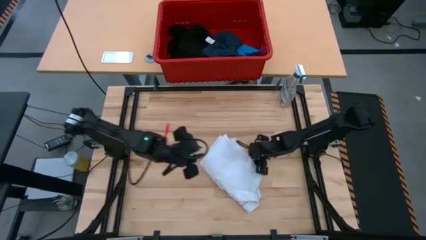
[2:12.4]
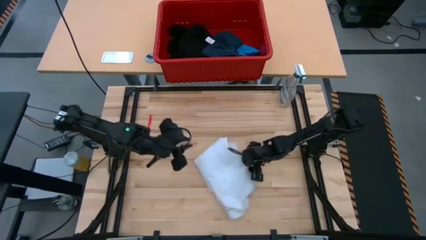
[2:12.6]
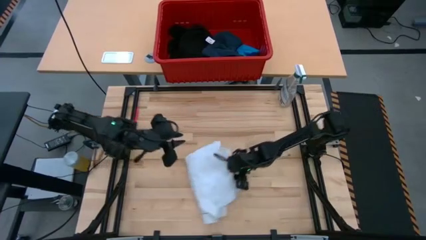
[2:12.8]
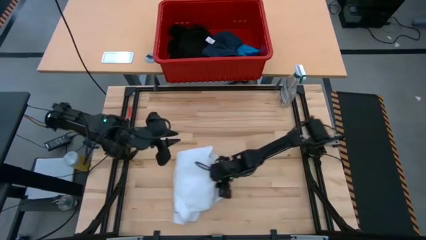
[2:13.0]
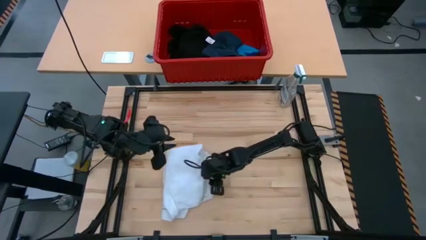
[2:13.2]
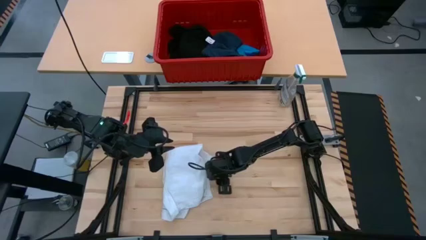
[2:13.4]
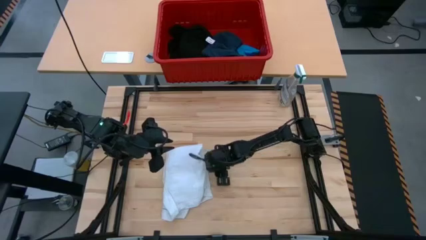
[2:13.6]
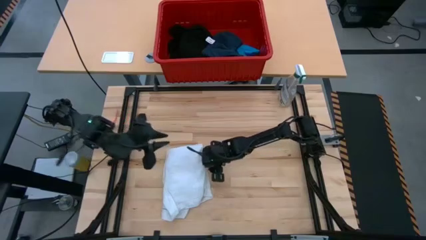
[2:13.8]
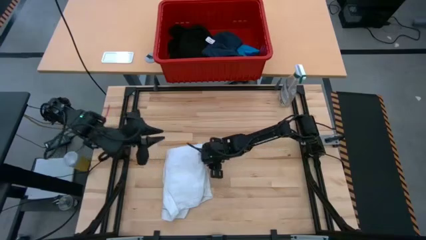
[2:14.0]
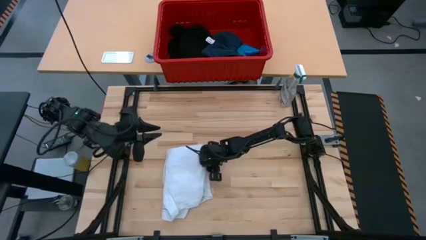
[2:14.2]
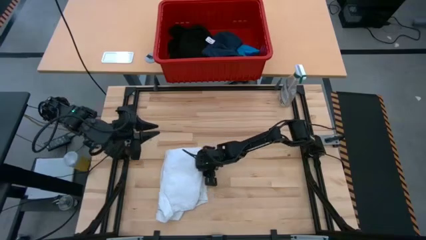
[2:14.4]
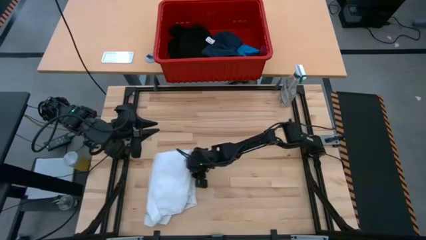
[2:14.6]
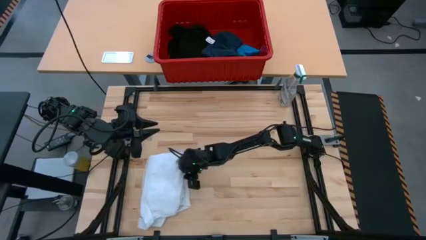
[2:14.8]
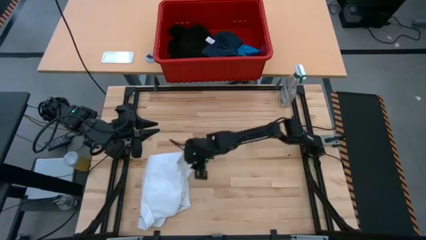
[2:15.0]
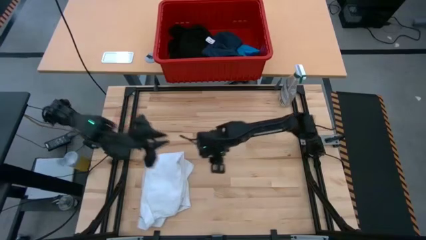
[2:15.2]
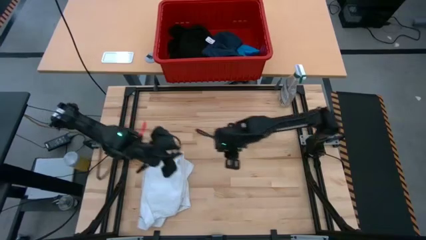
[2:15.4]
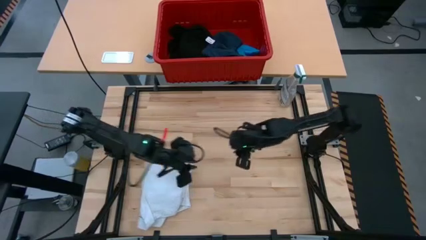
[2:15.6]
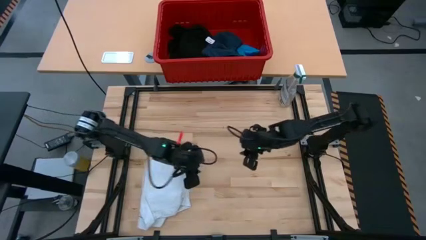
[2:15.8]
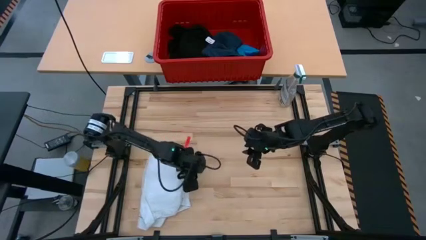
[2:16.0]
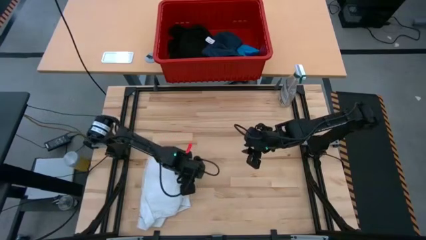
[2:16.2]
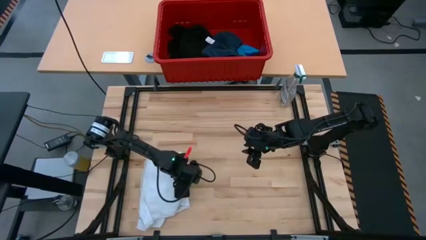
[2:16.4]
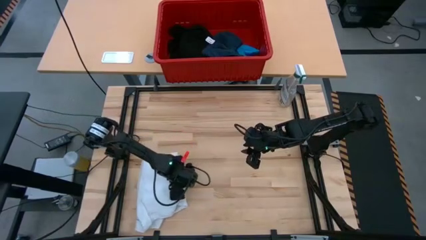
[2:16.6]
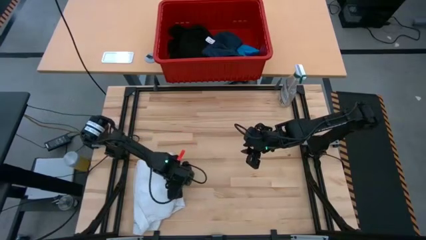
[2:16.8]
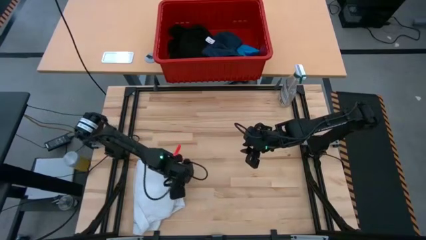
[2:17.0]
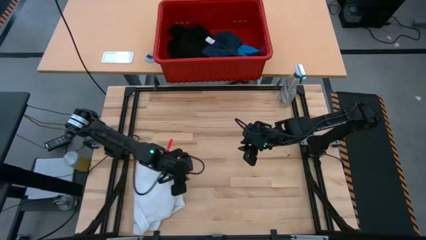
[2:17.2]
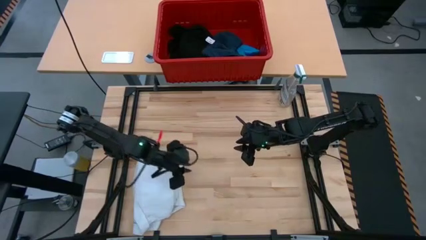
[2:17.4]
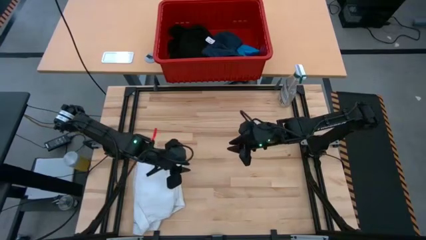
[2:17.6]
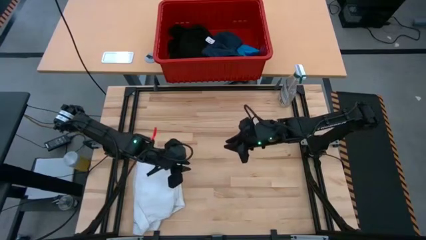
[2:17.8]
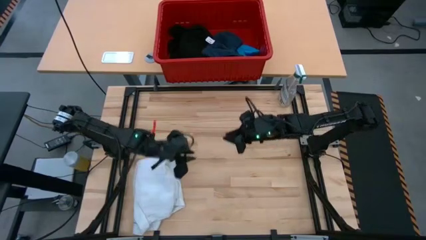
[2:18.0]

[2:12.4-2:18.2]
Task: Fold Laundry from Bin
Adjust the white polo shirt to the bottom left of the table

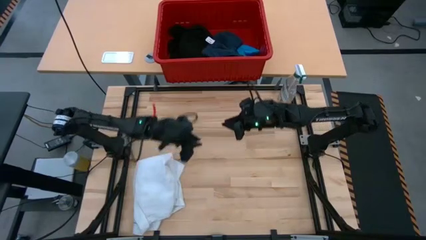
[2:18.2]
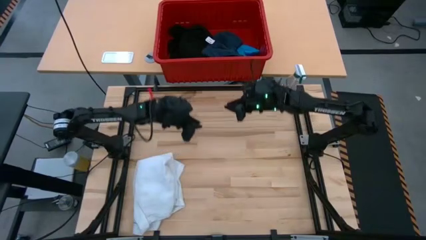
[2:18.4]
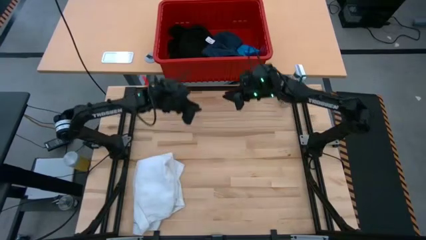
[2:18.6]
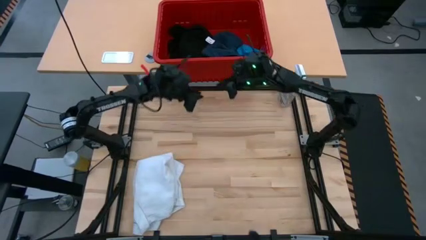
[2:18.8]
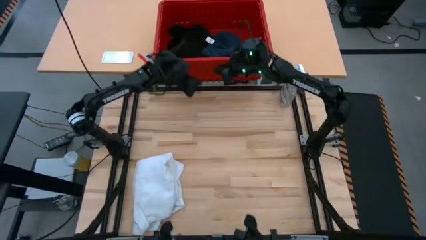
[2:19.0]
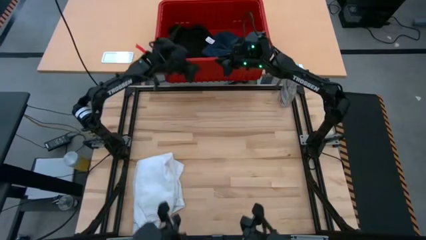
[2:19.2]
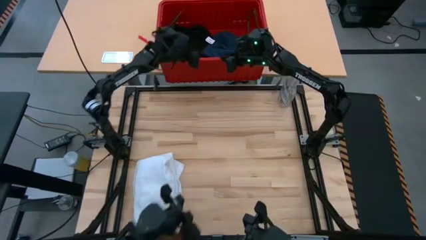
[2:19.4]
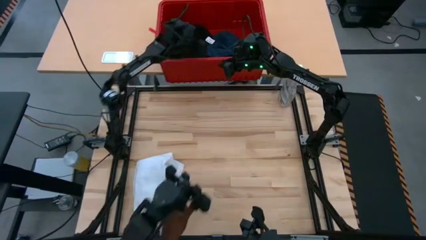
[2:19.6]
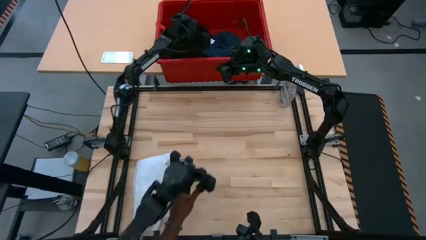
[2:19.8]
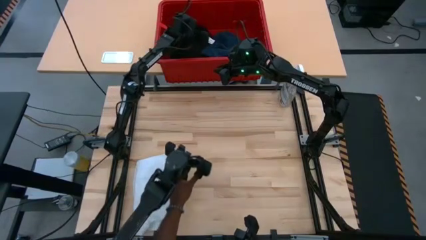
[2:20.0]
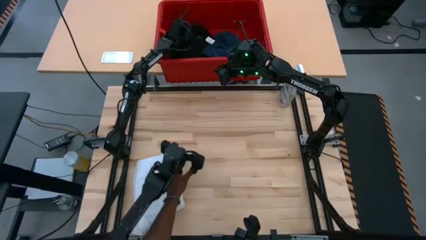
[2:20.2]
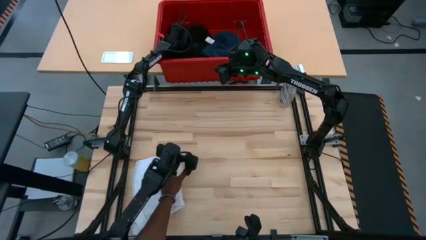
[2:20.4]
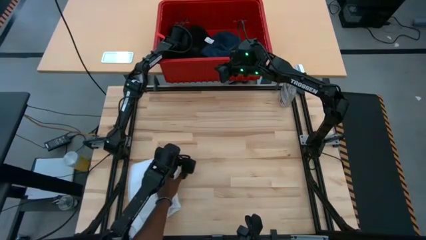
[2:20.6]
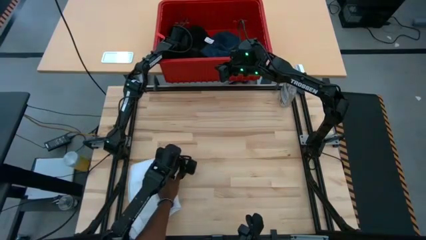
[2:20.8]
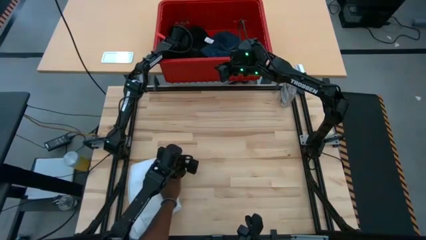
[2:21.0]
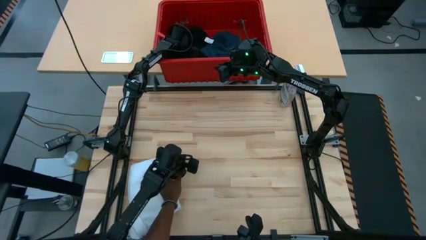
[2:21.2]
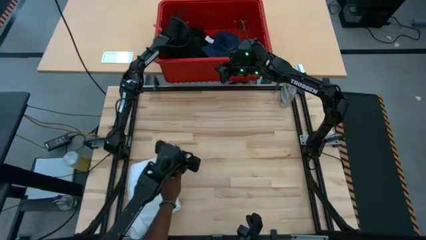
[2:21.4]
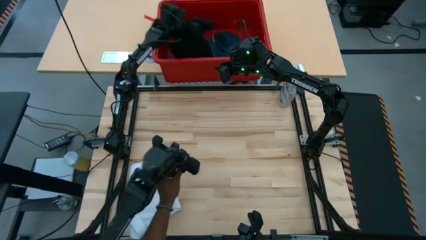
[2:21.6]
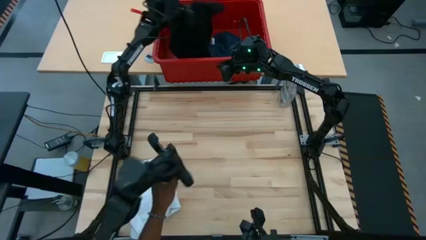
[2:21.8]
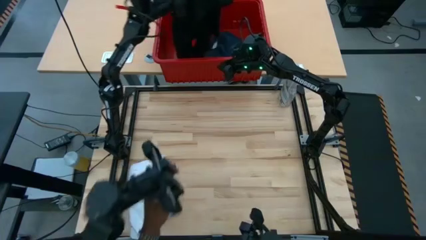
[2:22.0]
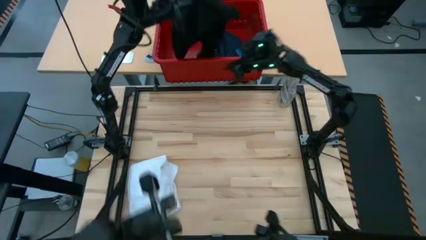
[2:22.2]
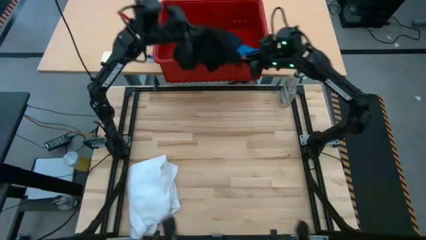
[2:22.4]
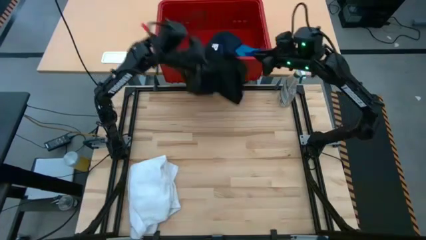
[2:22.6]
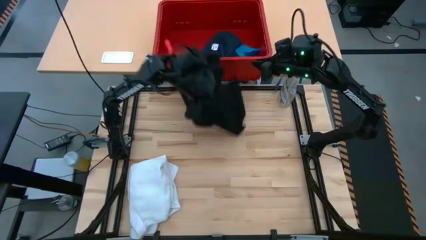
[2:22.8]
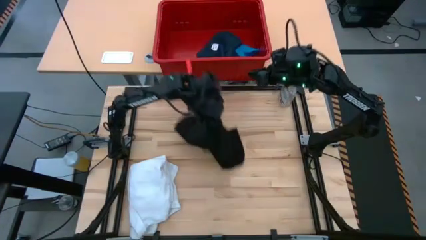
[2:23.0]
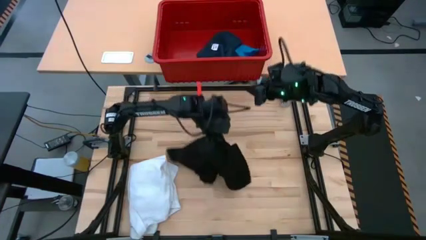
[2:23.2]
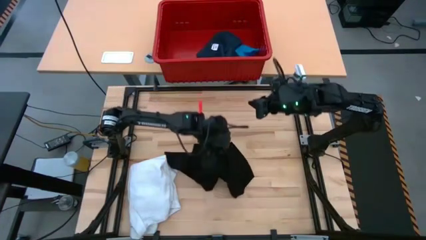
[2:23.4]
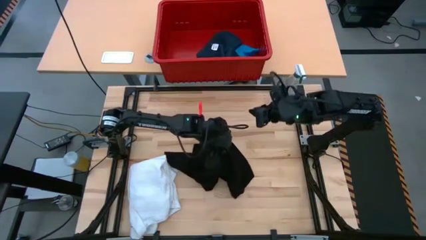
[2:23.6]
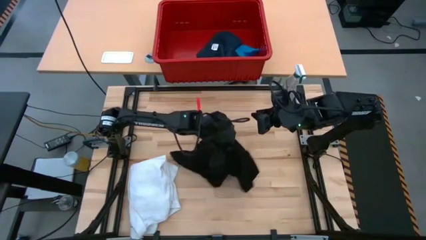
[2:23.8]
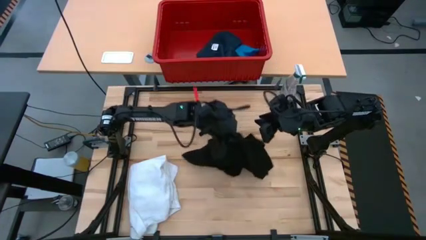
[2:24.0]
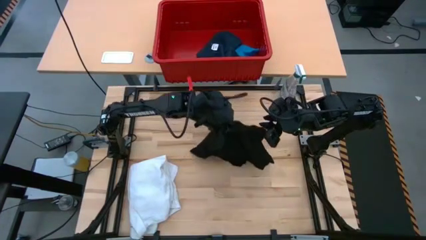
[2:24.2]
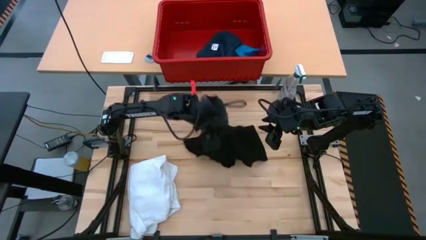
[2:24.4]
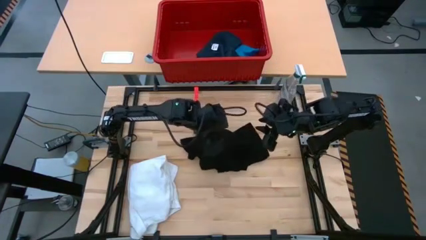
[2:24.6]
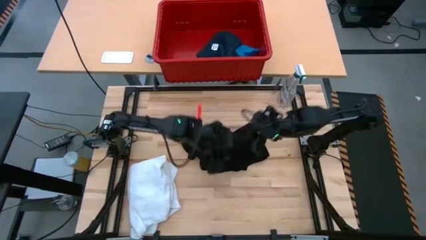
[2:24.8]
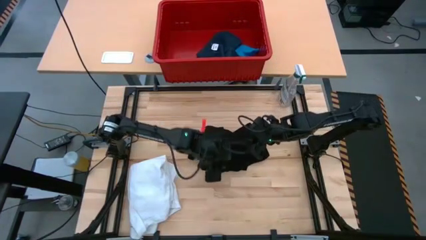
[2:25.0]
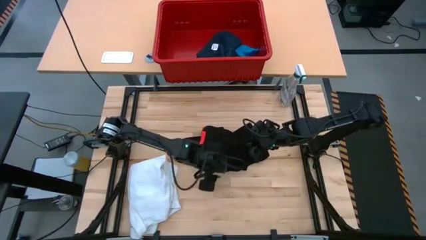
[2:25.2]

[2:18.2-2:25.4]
Remove the black shirt from the red bin and place it on the table

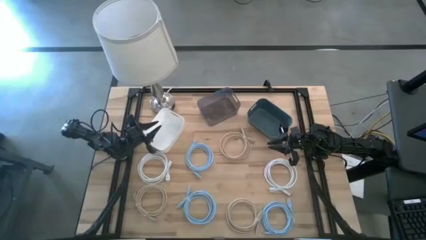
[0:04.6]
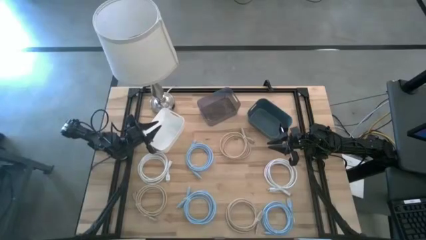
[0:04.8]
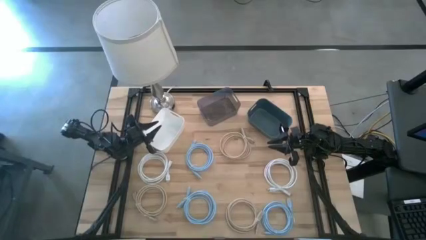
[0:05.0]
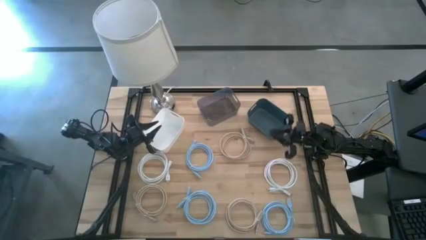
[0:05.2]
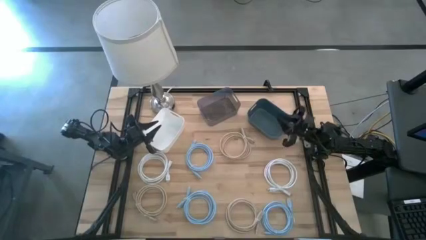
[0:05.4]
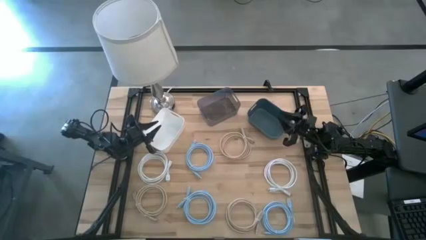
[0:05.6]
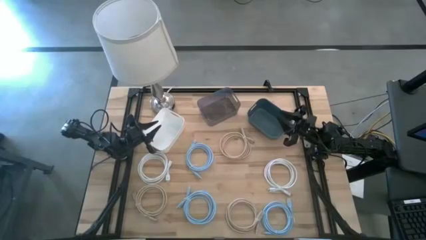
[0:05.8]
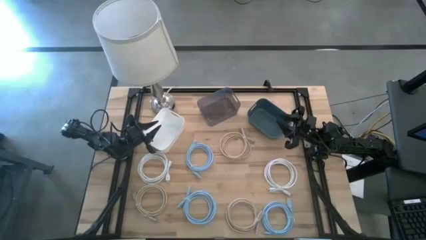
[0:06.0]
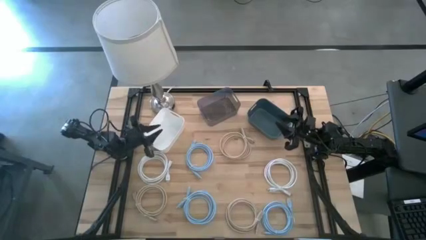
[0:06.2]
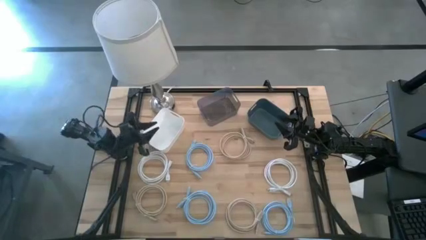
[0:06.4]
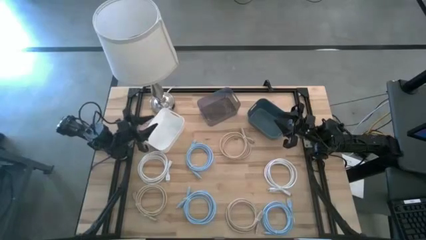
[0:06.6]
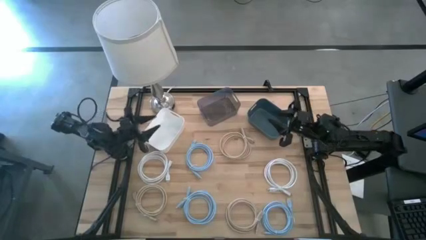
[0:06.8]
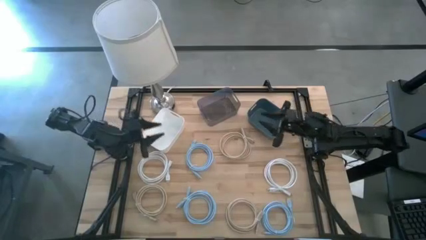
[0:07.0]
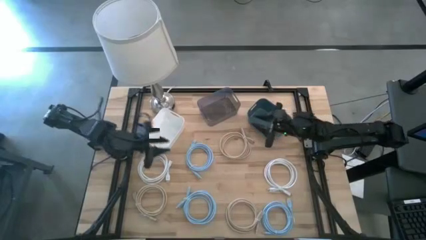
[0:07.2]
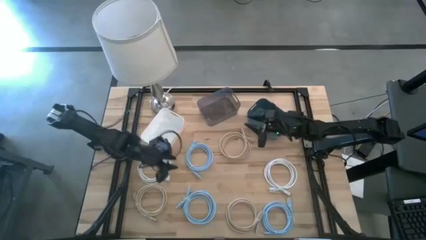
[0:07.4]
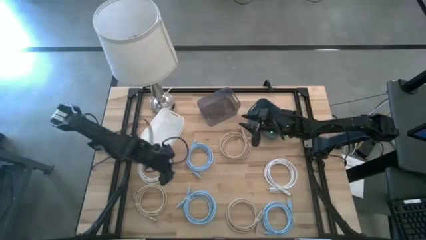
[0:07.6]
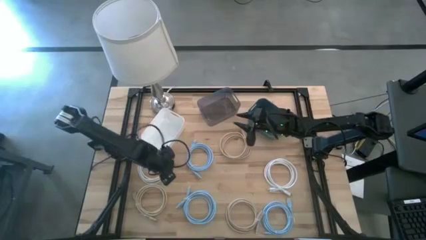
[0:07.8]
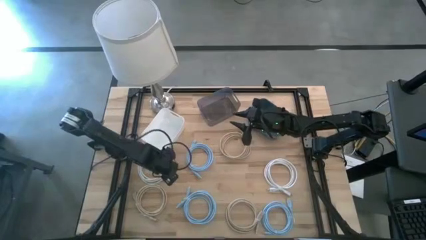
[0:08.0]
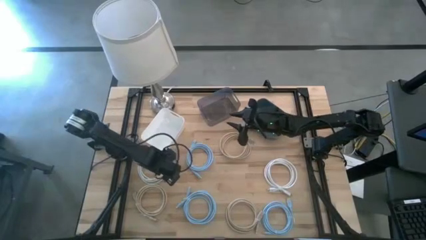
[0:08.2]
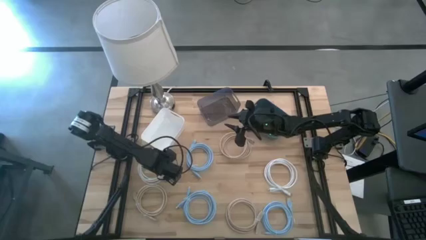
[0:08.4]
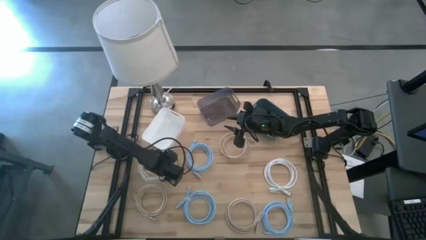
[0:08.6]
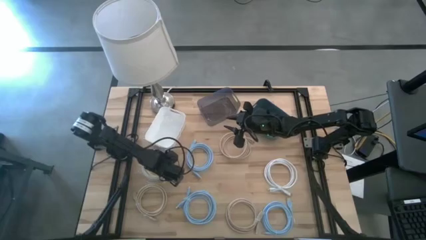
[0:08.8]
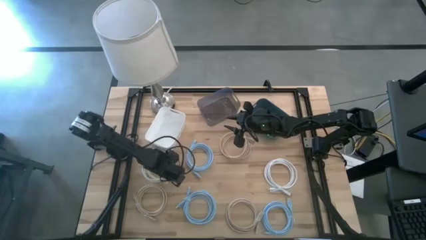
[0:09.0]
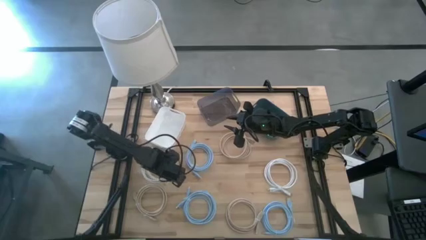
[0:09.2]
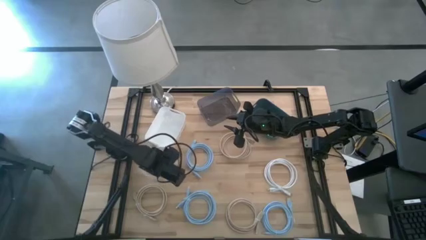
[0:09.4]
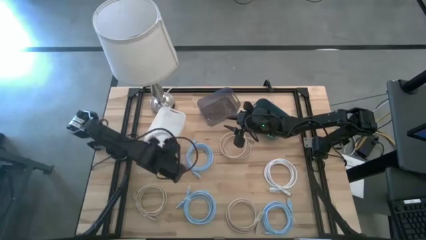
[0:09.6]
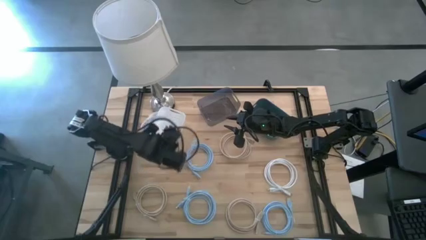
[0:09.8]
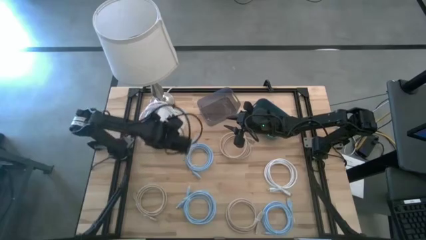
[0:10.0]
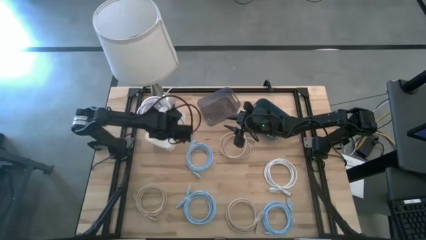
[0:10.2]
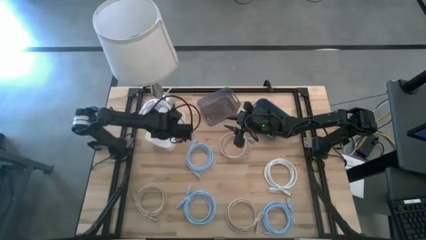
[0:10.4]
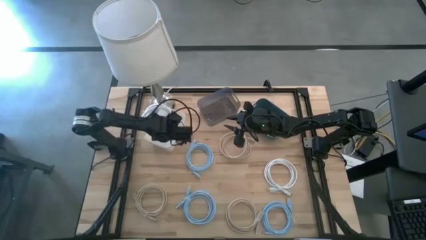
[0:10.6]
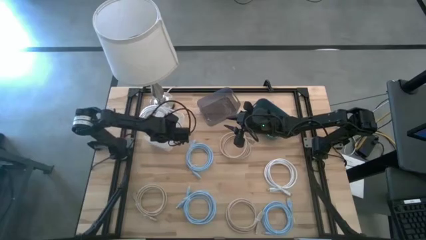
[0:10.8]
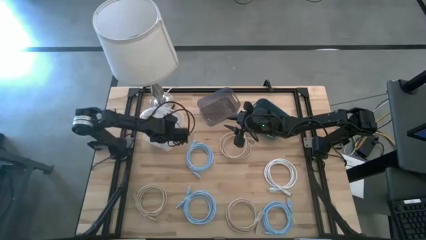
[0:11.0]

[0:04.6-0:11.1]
Task: Sort HDMI cables
Put the left white HDMI cable into the white bin
